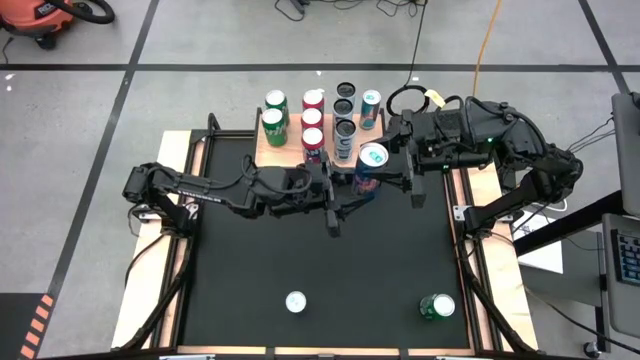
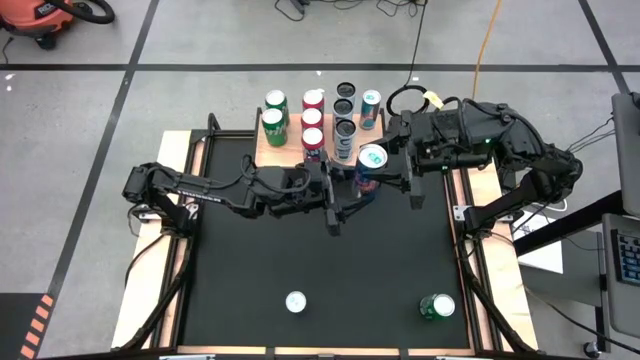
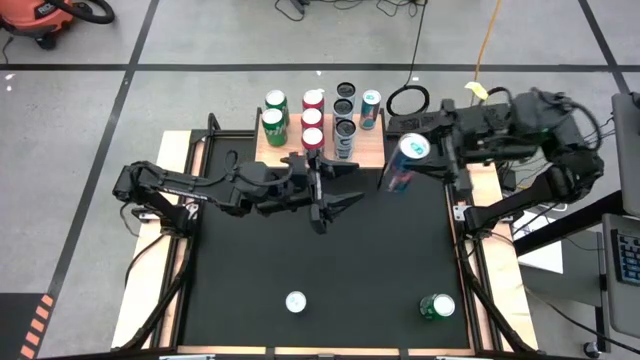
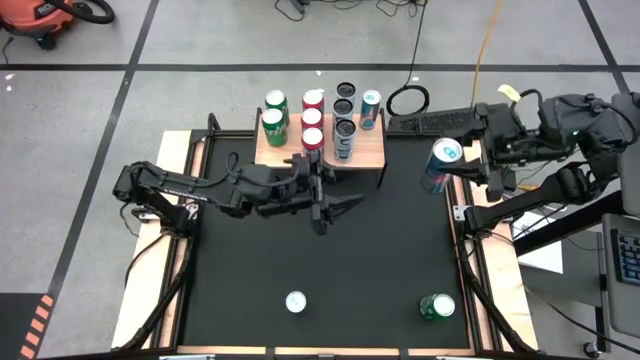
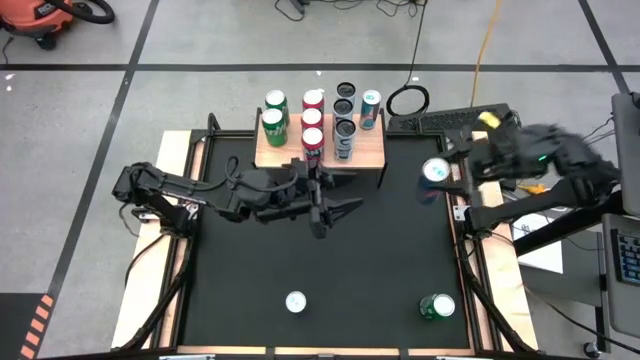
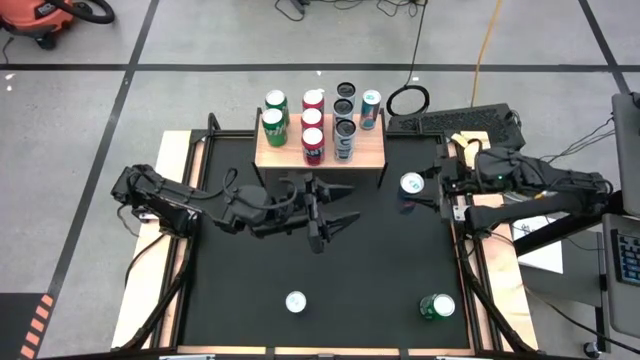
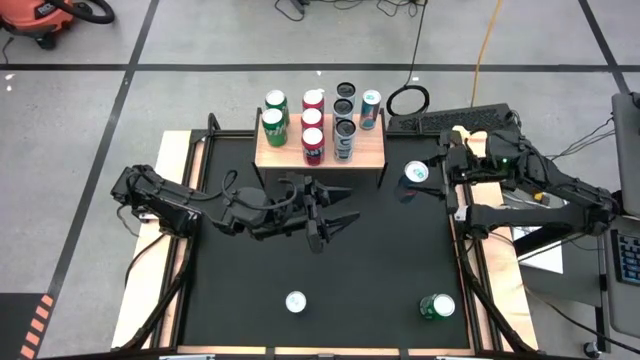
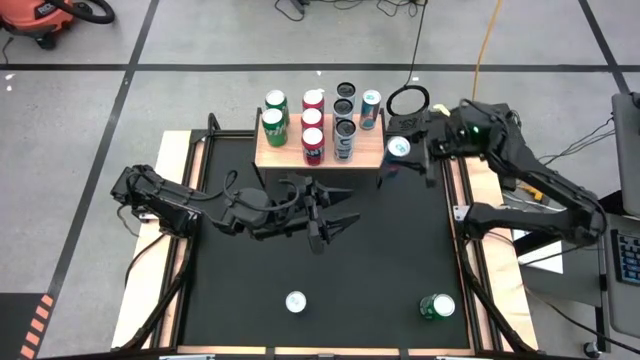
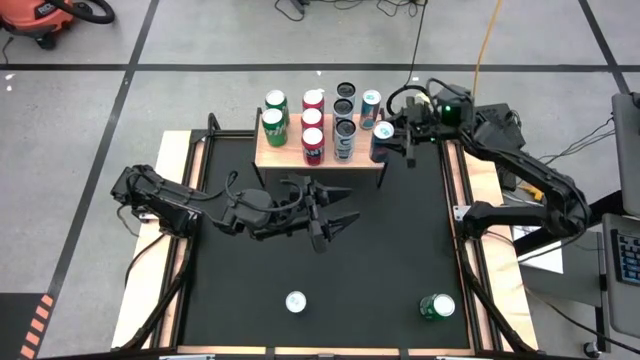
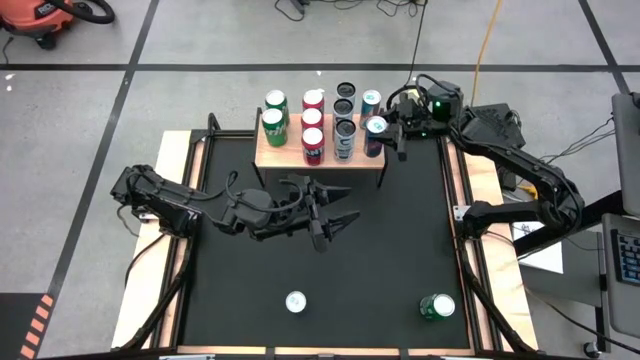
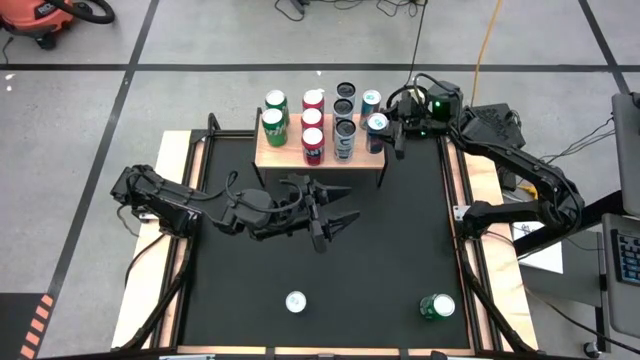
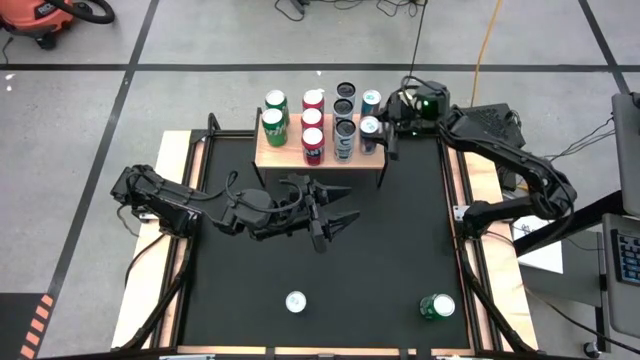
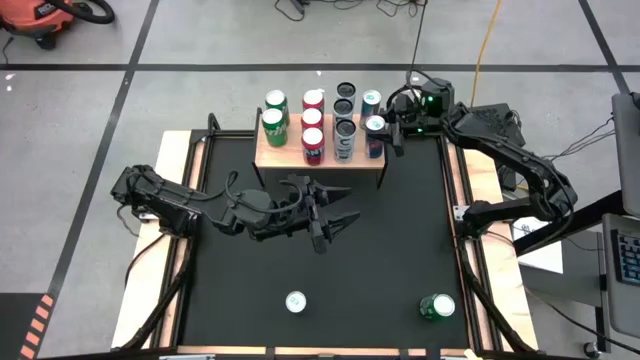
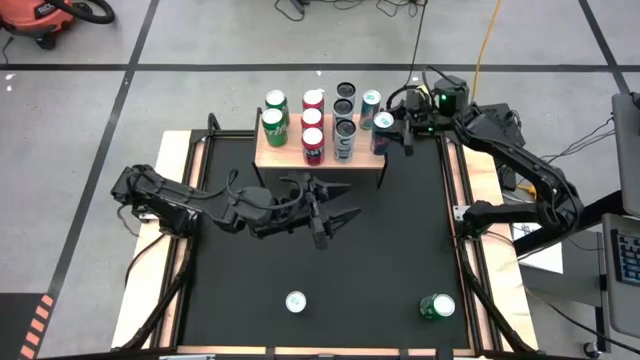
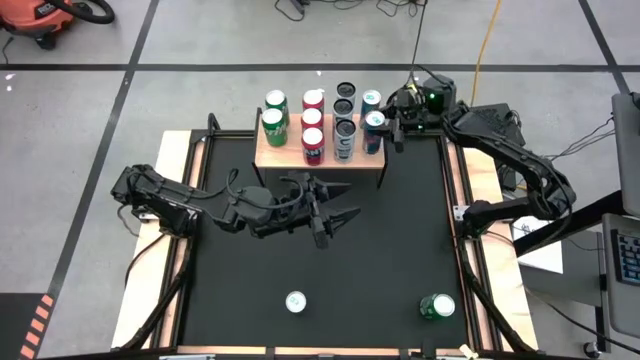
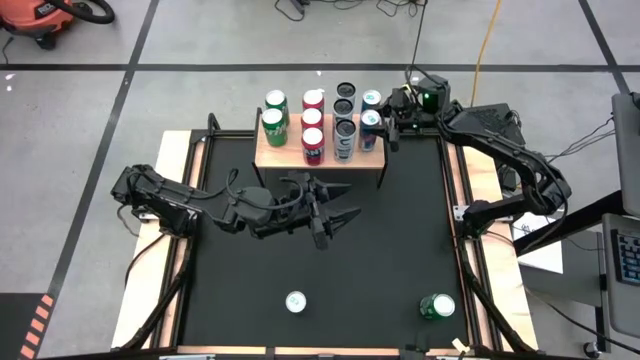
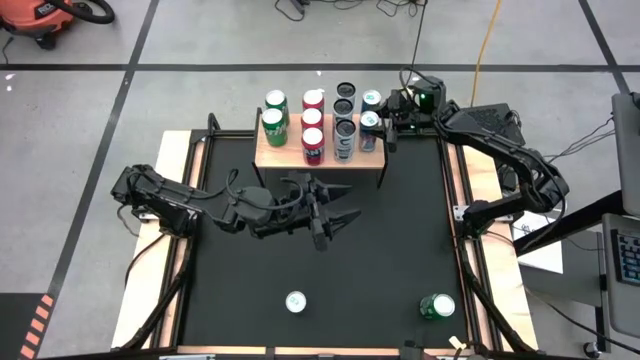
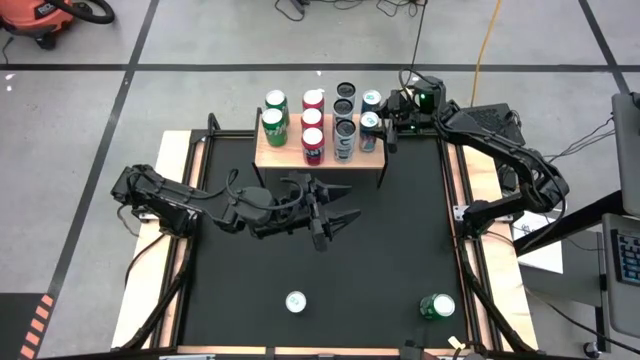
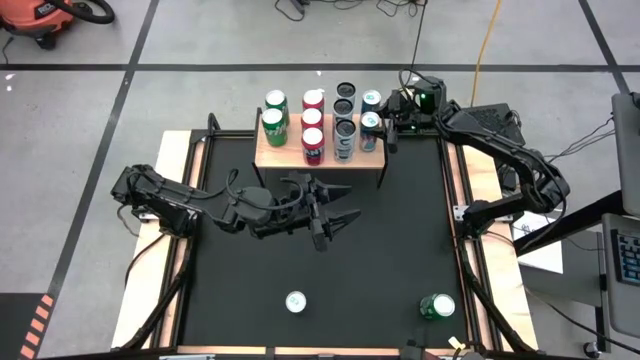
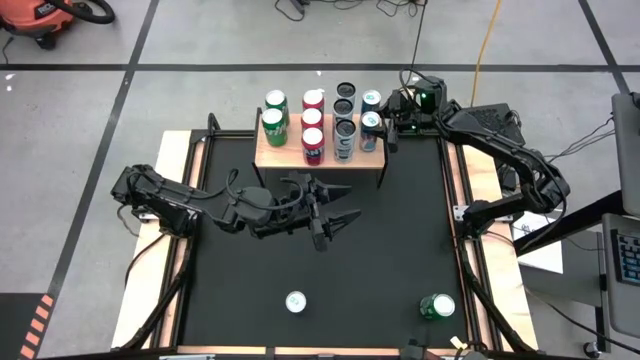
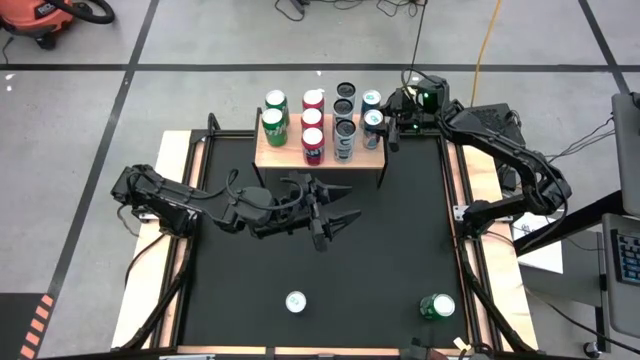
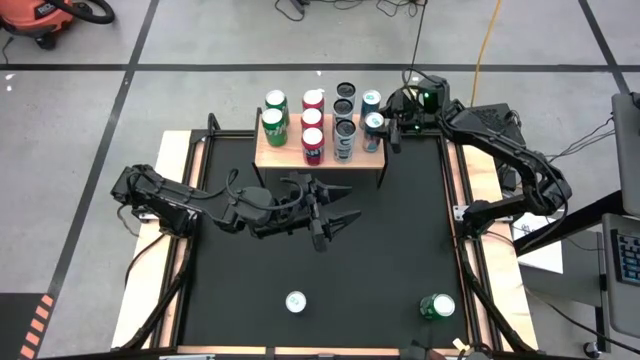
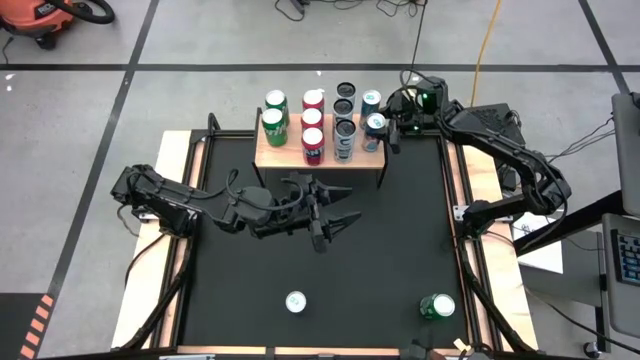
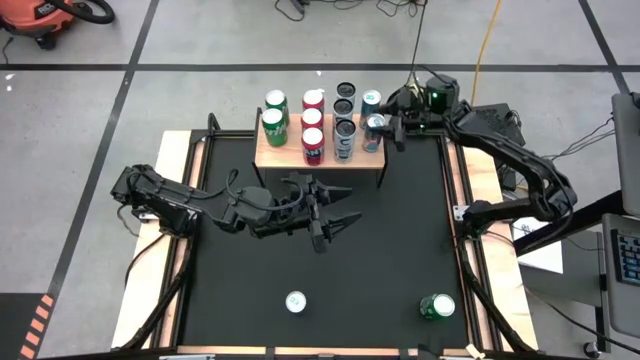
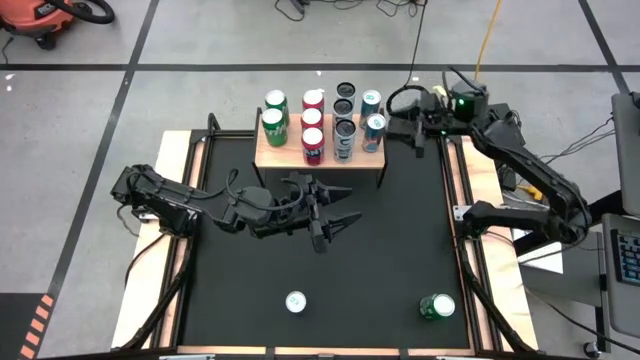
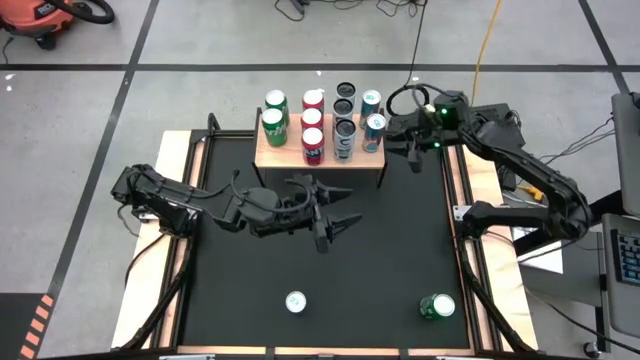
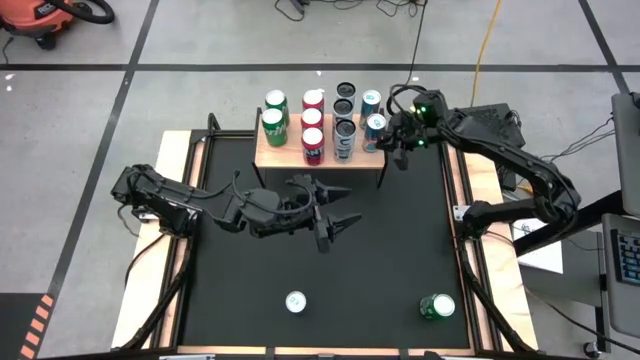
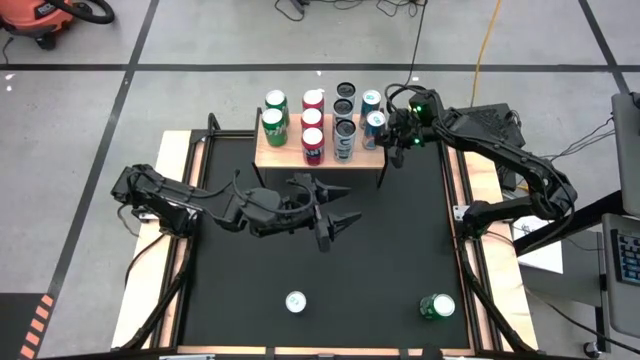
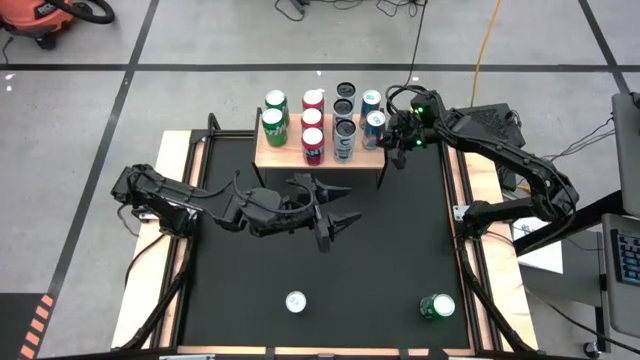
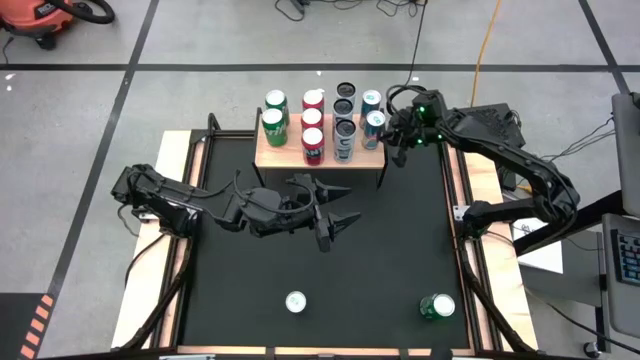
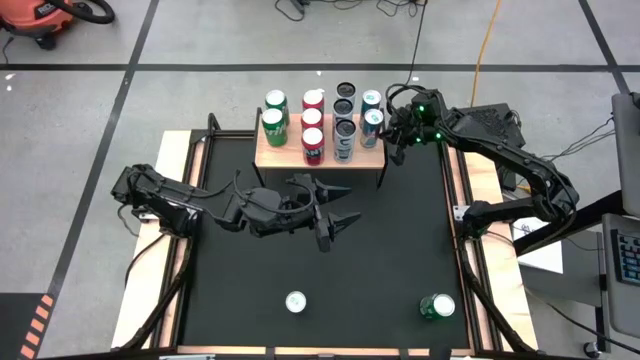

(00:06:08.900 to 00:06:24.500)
Task: Place canned beverage on shelf
Put the top blue soda can on the shelf aligned with the other blue soda can

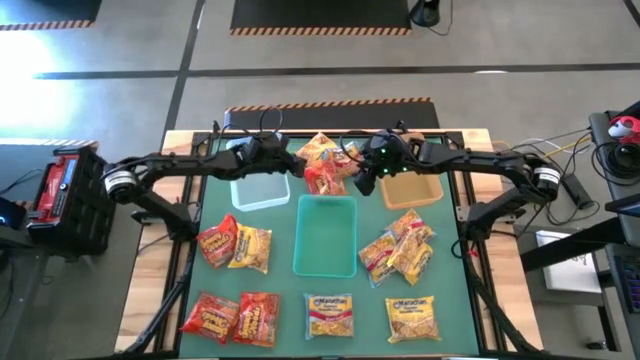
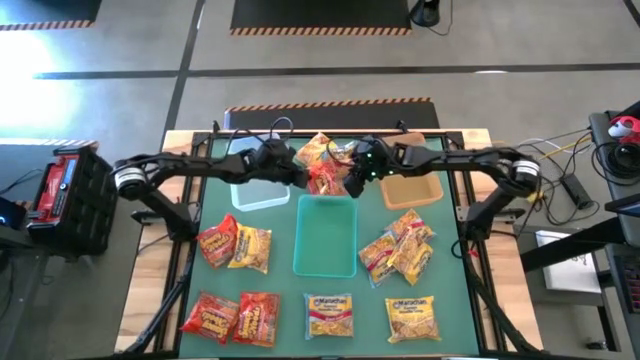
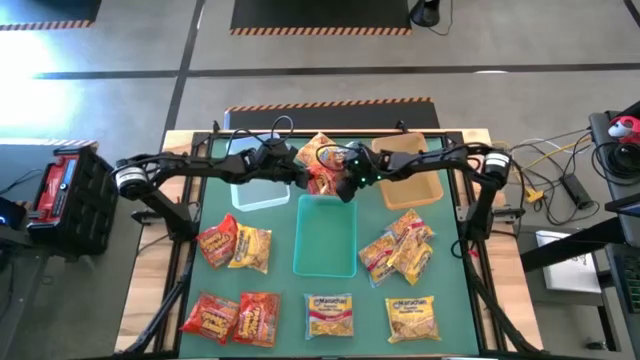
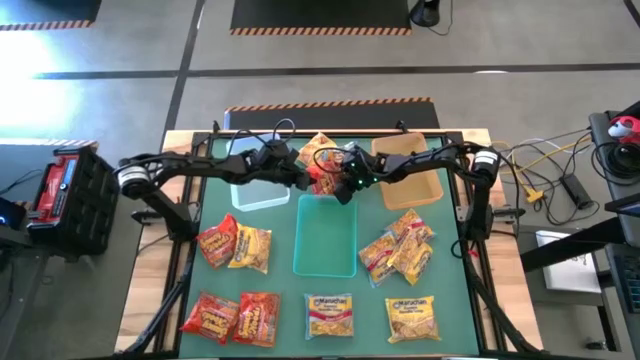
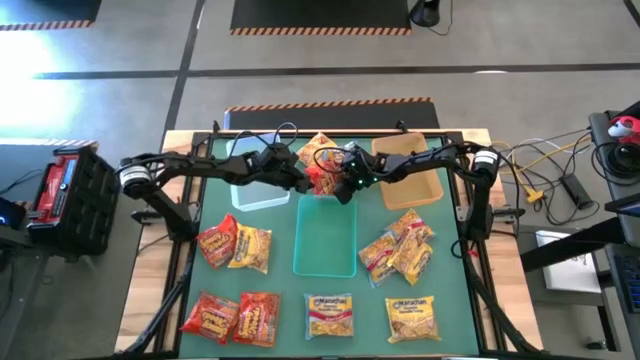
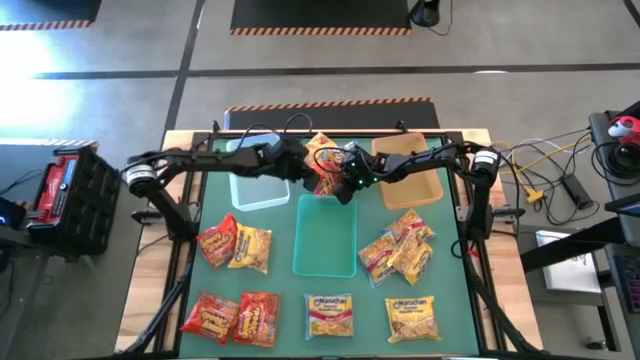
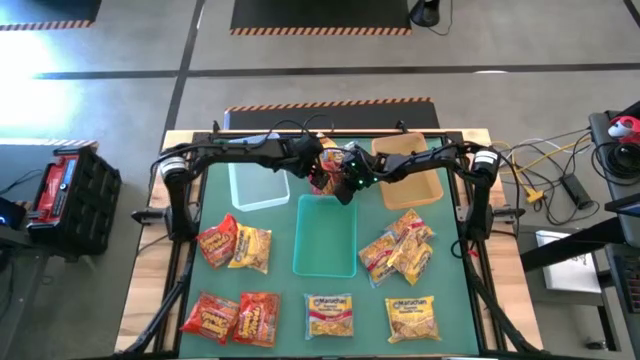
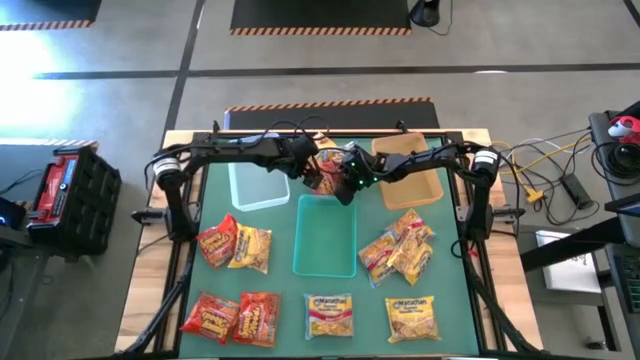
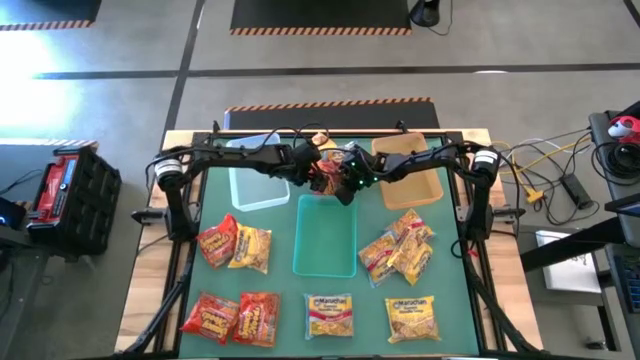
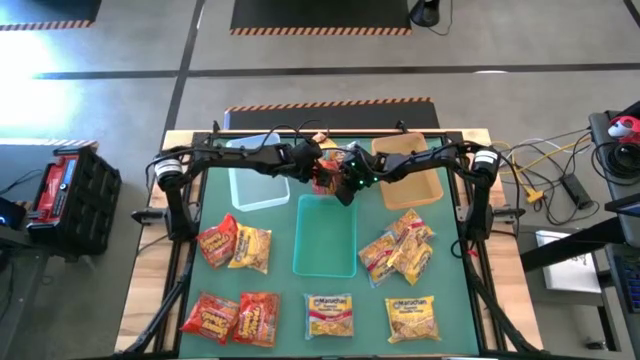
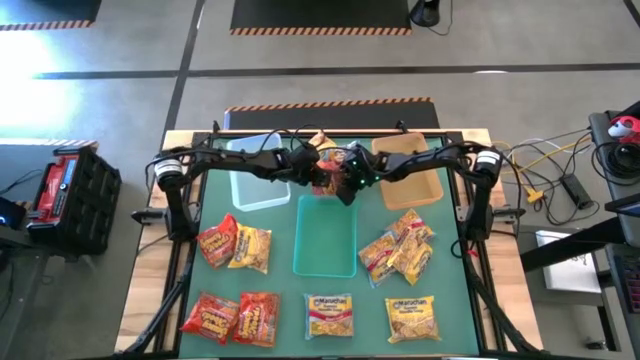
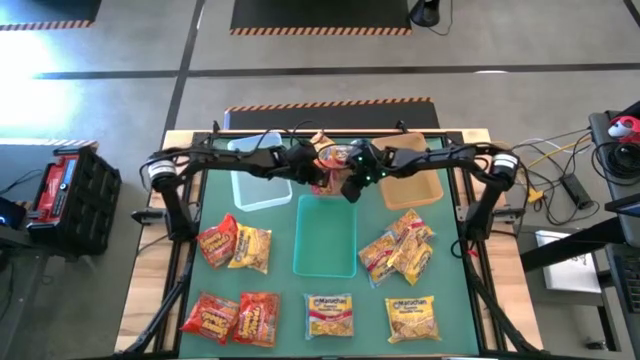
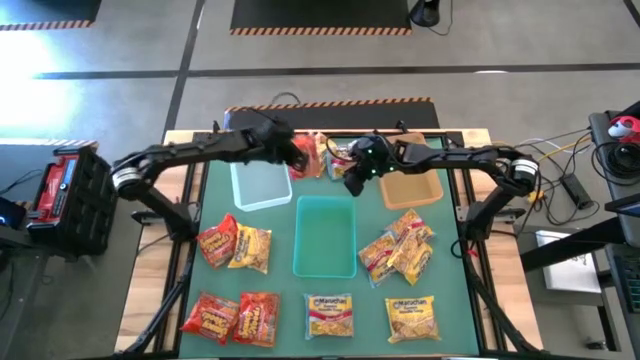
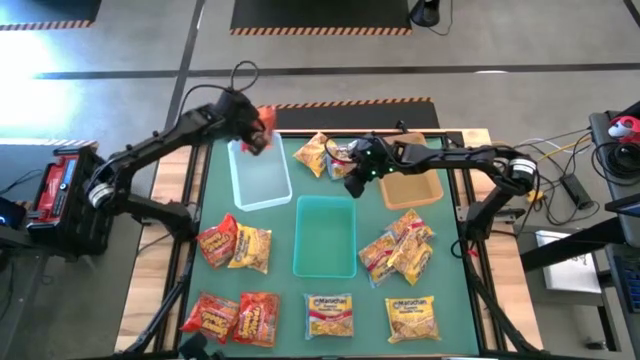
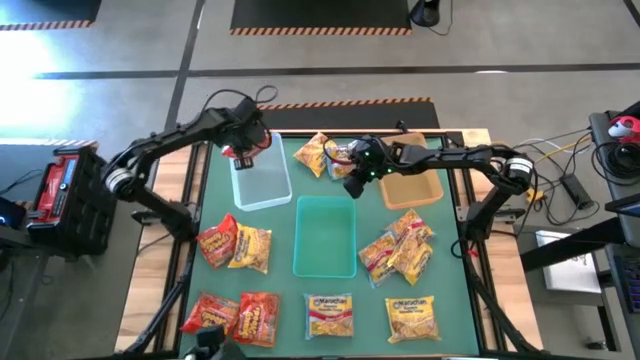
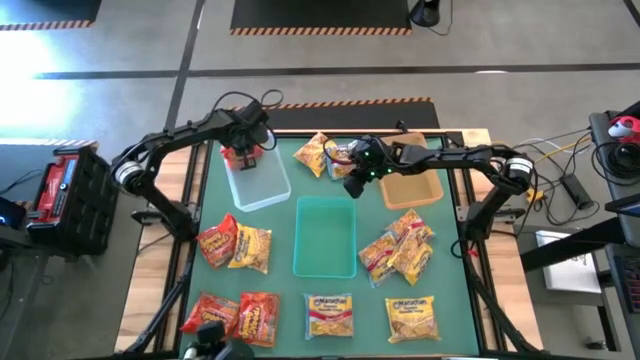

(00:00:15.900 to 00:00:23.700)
Task: Sort Maruchan noodles
Put the orange noodle pack into the transparent bin
